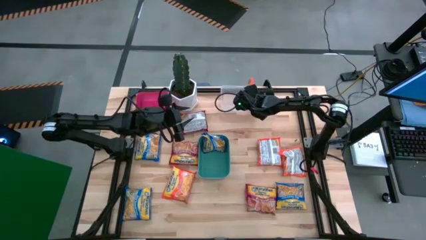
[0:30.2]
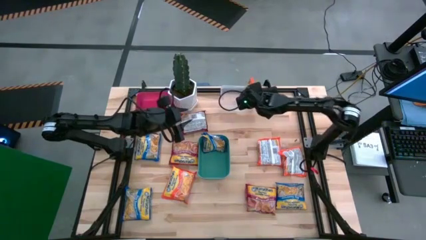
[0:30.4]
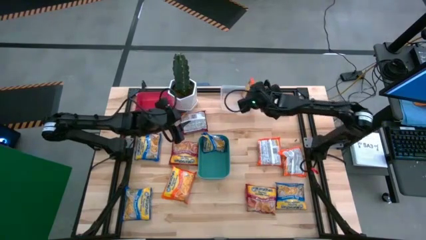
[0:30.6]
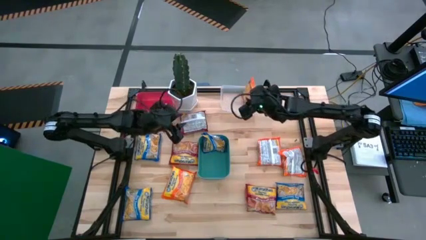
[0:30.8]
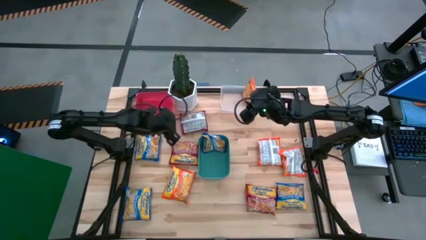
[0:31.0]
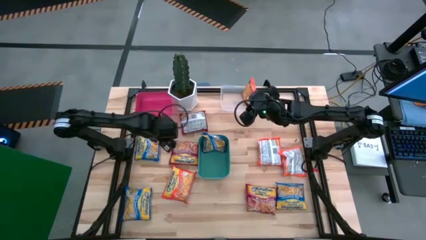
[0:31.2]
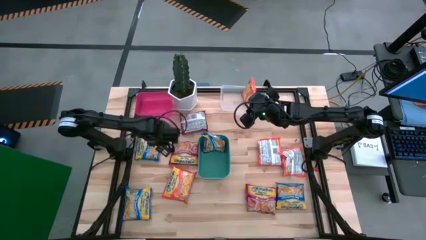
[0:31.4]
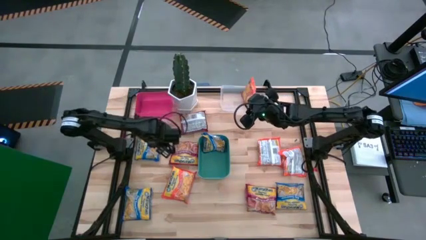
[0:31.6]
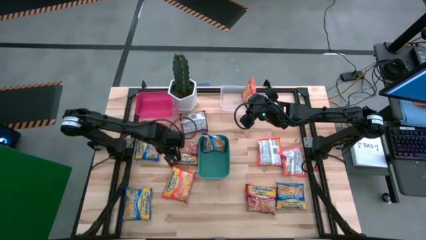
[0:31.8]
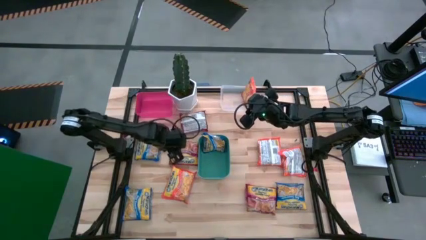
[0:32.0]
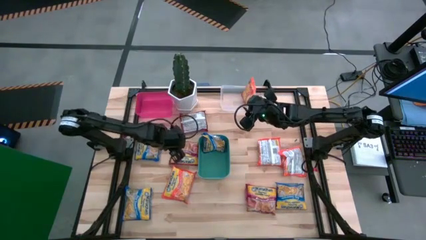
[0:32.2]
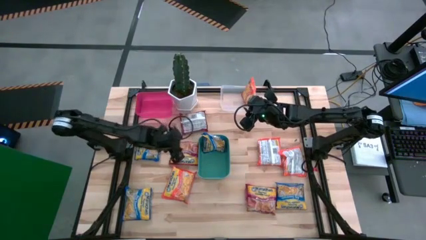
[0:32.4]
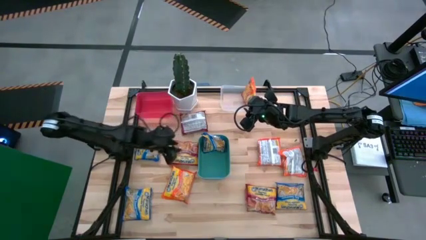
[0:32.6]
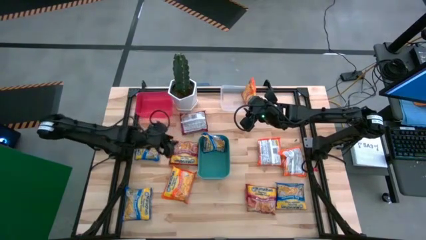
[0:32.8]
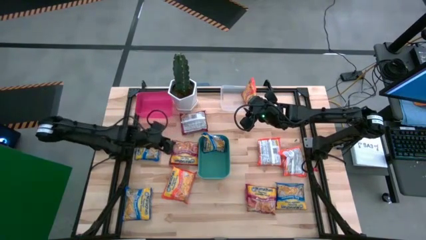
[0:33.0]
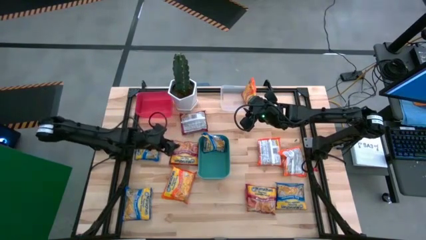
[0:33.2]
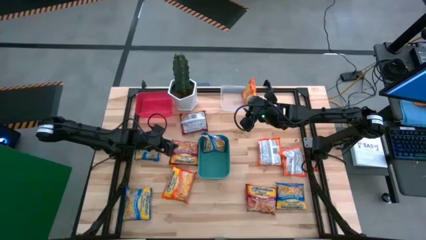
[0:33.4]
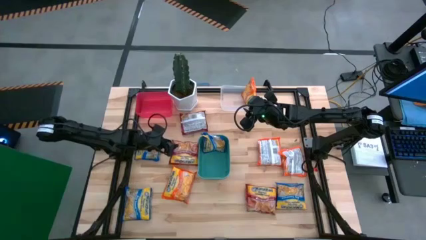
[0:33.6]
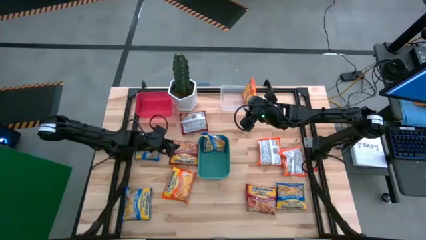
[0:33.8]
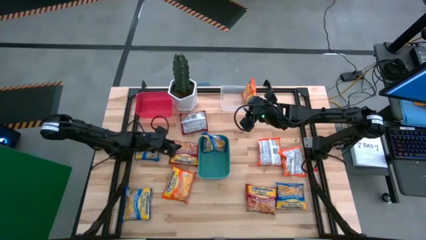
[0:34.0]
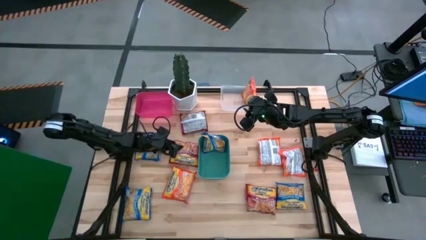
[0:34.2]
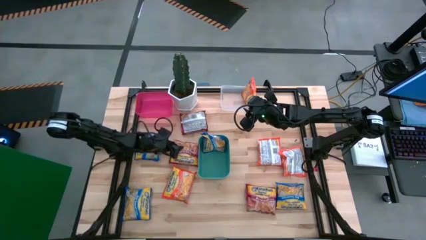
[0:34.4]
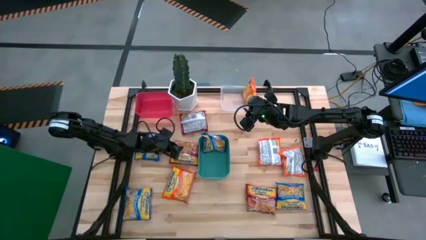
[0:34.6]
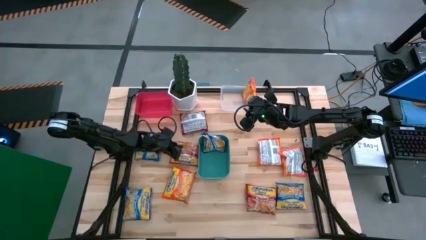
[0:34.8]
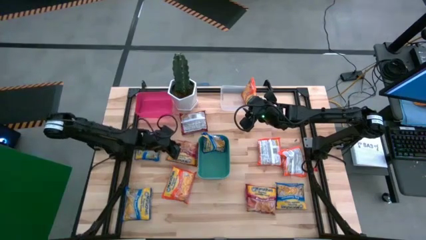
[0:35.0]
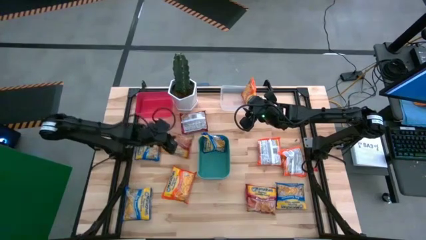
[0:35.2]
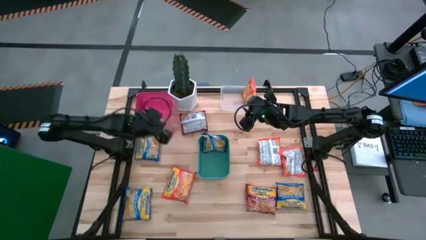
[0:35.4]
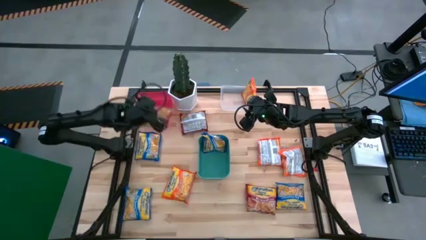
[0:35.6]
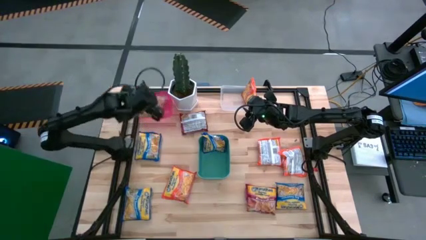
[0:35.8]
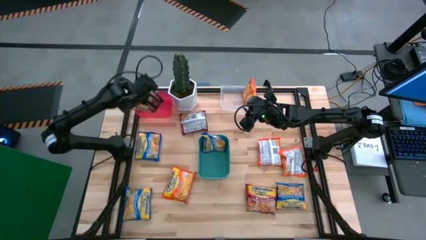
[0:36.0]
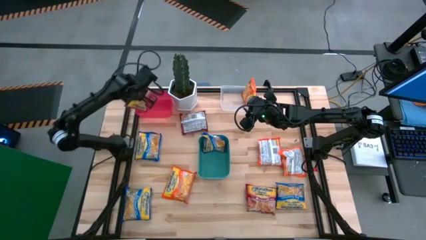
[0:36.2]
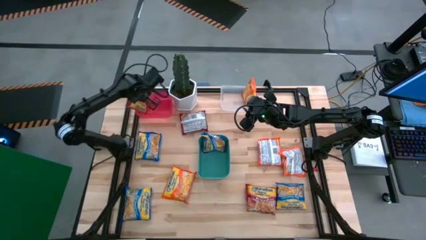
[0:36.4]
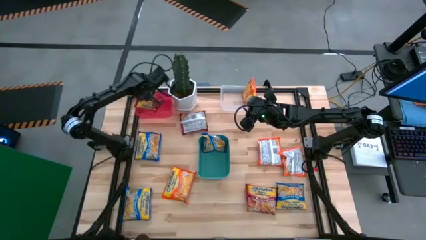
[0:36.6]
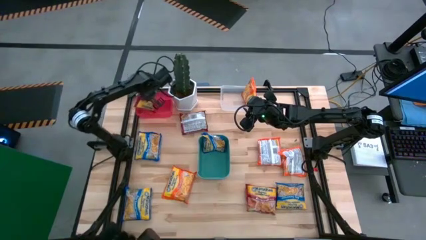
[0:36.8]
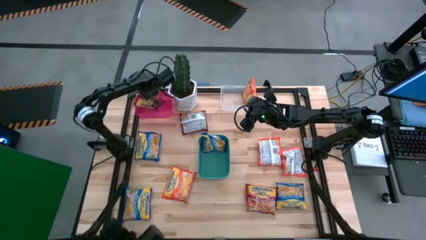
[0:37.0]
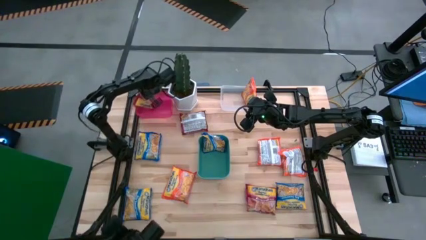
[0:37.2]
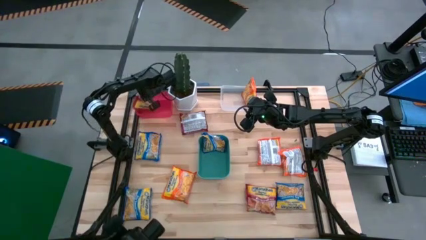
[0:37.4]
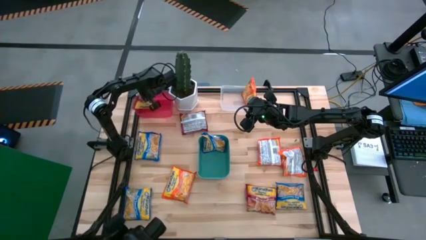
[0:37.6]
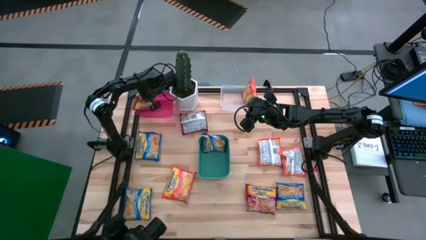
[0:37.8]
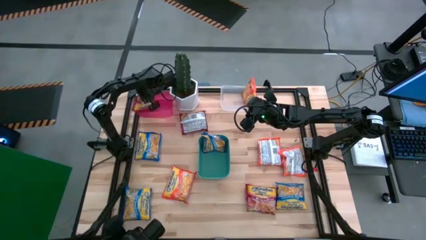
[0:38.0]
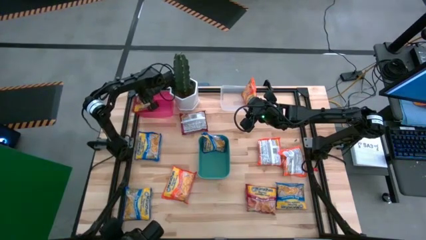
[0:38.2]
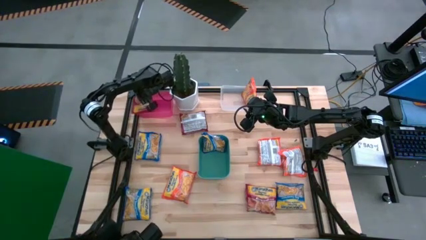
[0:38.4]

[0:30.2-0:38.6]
Task: Sort Maruchan noodles
Put the red noodle pack into the pink bin

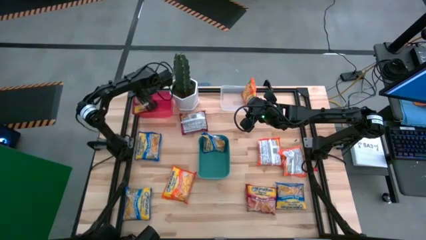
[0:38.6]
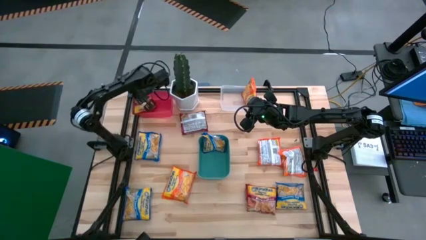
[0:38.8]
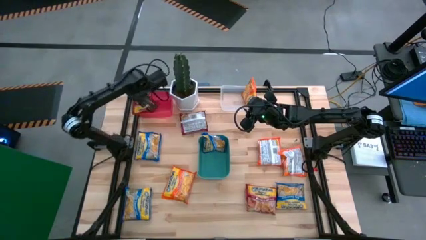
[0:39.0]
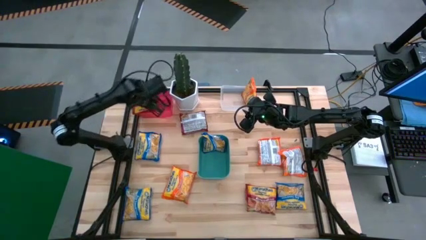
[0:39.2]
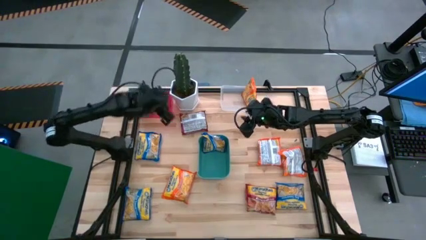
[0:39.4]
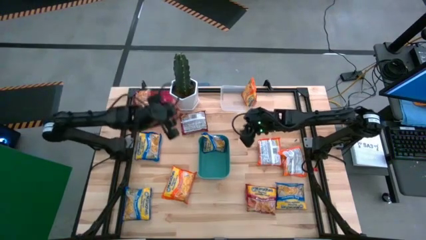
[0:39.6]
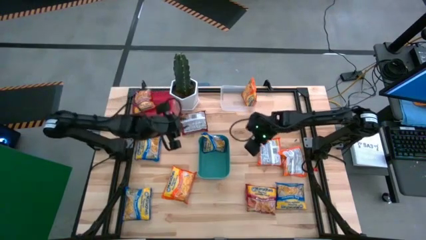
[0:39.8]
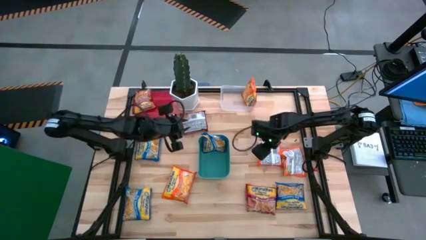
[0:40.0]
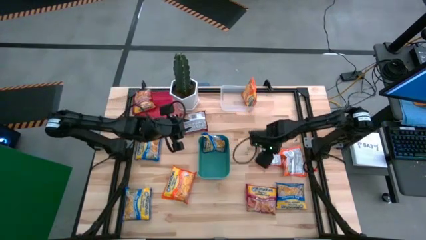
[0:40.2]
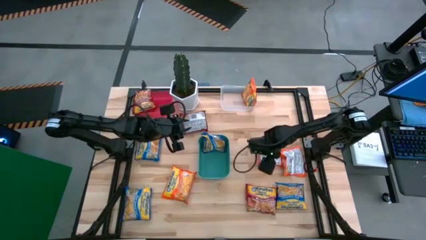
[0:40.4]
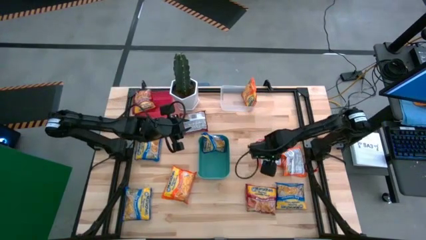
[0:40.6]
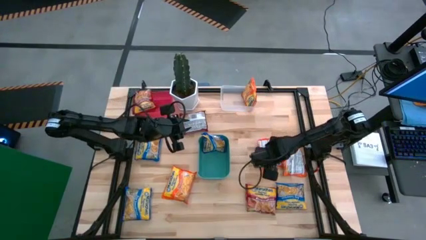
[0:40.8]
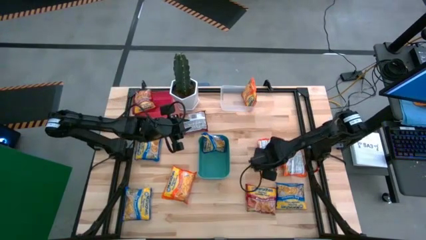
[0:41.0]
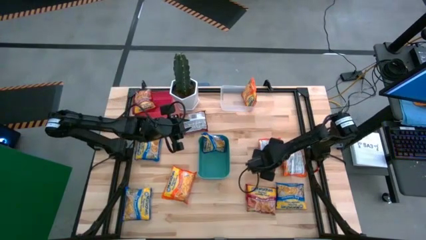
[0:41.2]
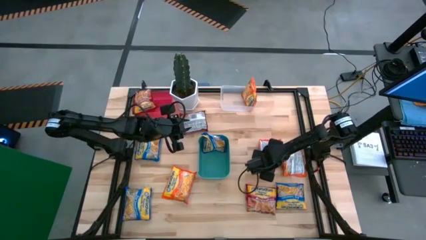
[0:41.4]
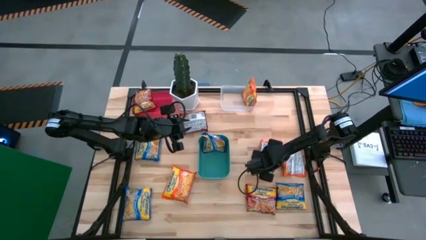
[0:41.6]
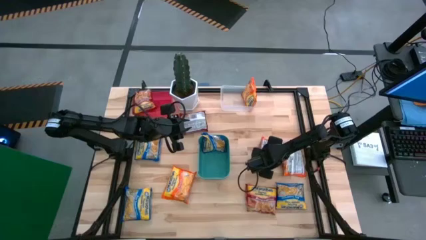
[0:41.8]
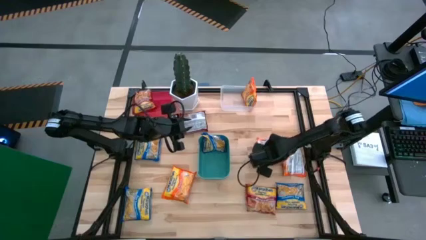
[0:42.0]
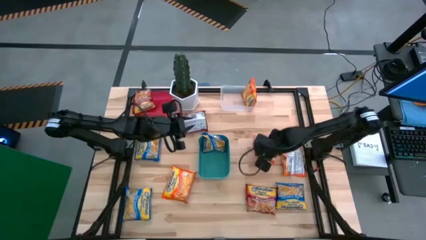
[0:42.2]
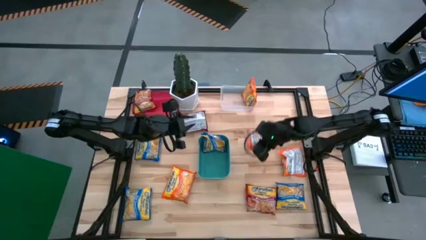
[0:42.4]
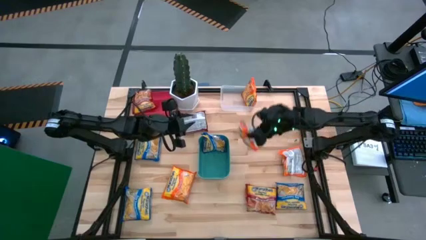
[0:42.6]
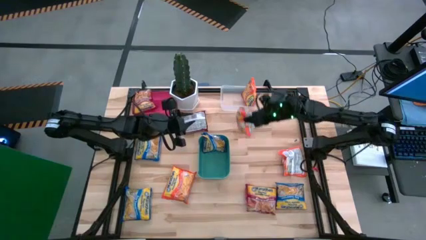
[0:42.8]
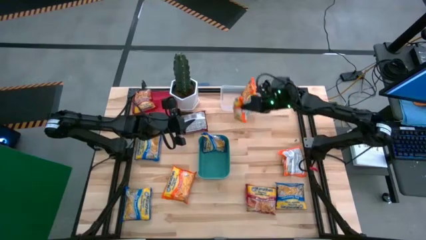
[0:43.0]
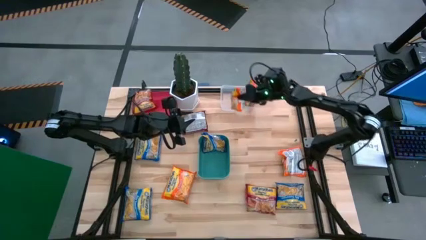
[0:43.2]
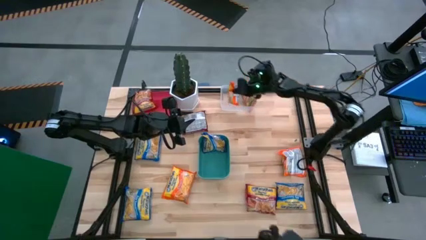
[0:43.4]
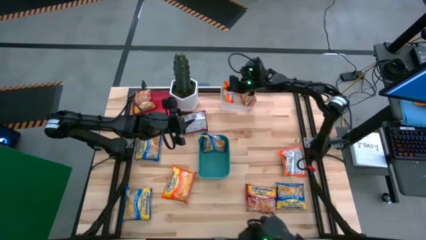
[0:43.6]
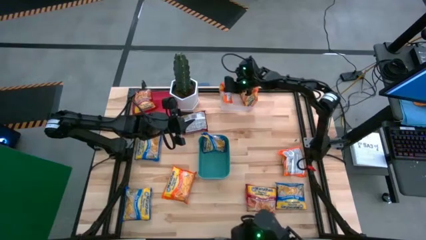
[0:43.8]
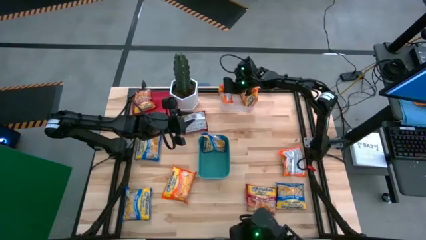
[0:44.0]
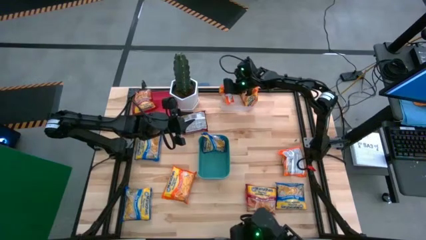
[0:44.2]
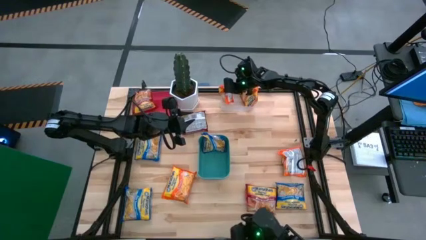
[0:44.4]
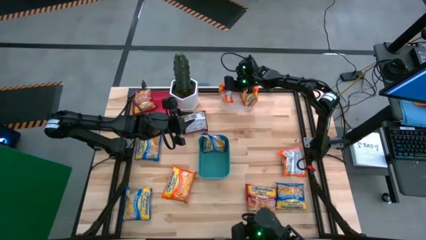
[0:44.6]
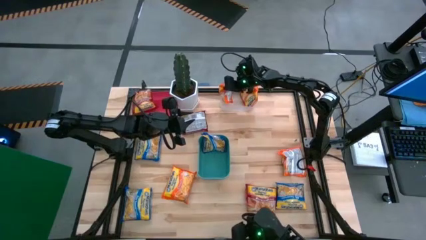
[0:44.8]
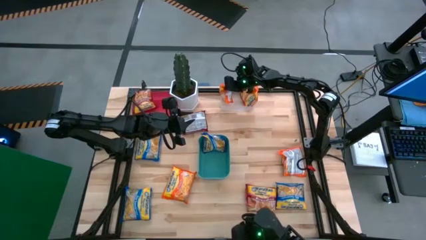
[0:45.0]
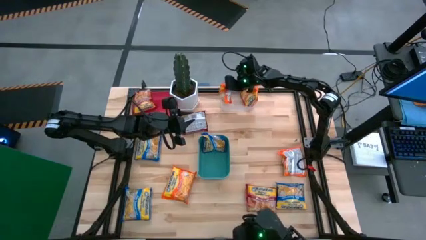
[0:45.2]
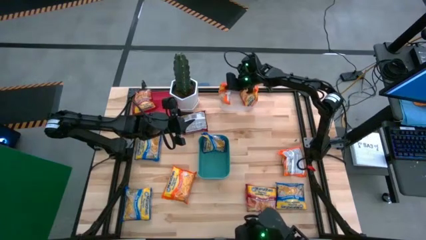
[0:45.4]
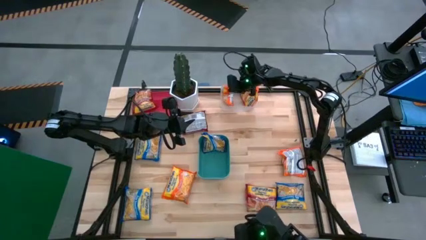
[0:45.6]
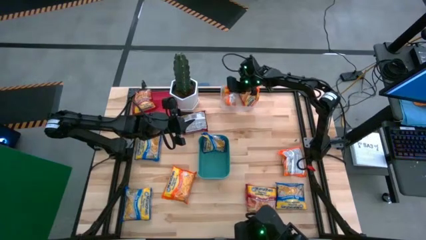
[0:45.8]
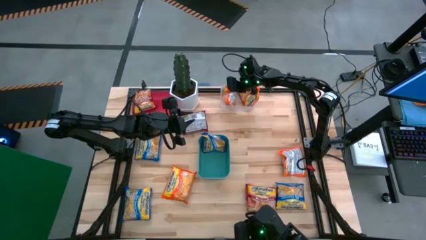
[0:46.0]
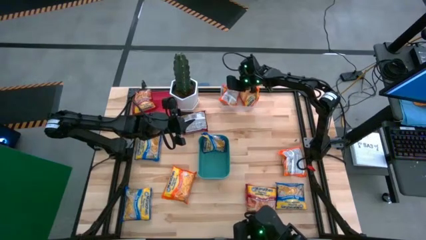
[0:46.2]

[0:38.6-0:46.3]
Put the orange noodle pack into the transparent bin
